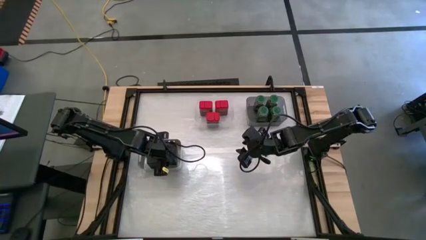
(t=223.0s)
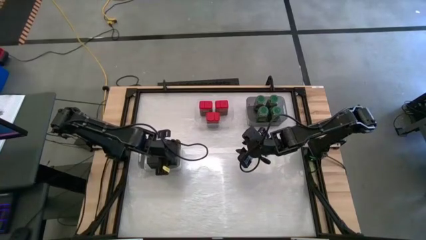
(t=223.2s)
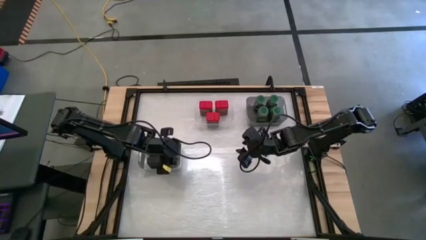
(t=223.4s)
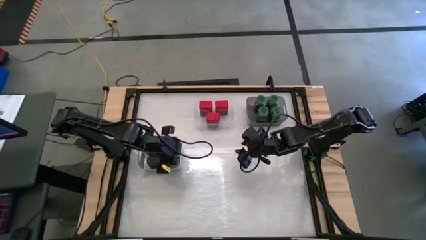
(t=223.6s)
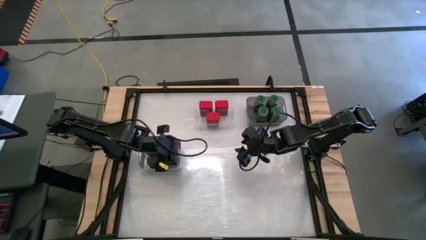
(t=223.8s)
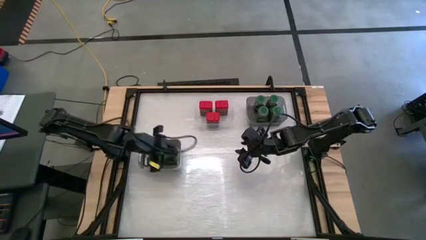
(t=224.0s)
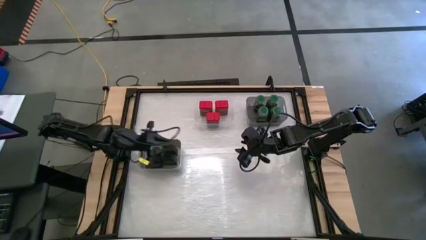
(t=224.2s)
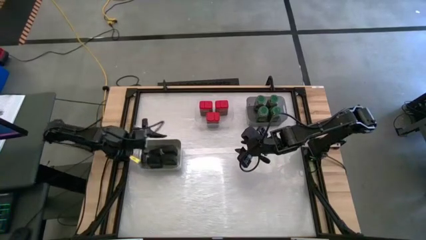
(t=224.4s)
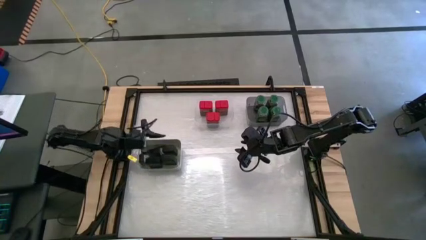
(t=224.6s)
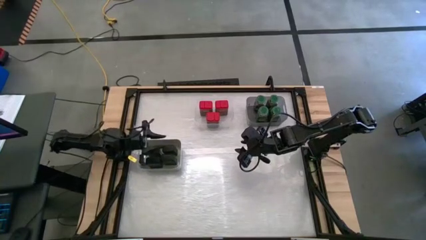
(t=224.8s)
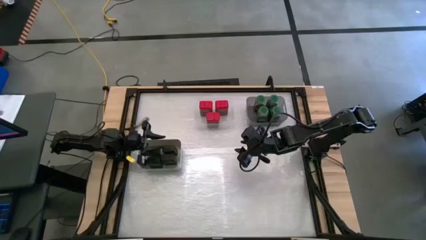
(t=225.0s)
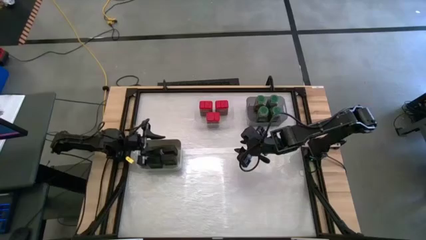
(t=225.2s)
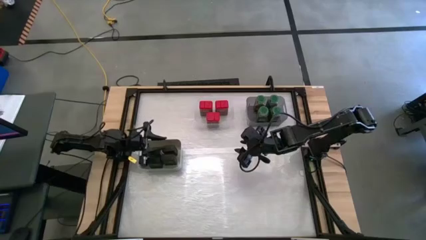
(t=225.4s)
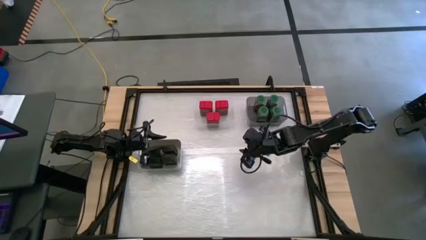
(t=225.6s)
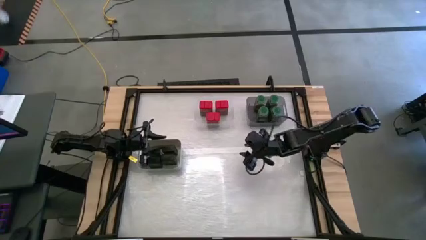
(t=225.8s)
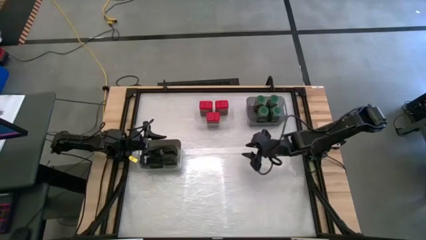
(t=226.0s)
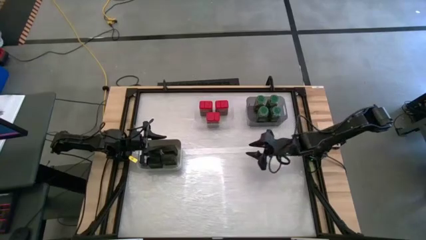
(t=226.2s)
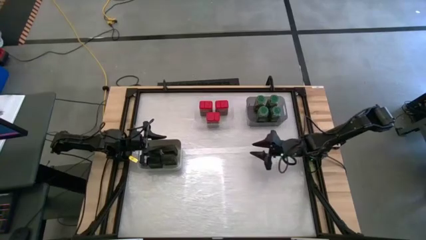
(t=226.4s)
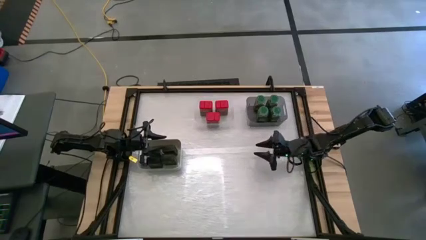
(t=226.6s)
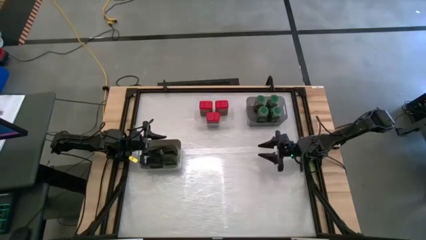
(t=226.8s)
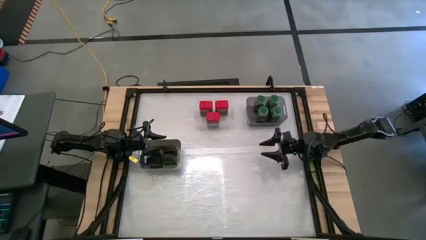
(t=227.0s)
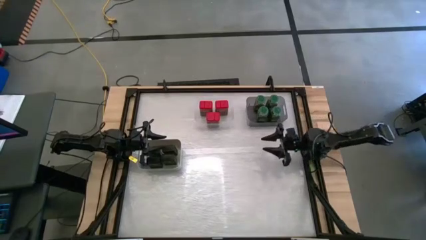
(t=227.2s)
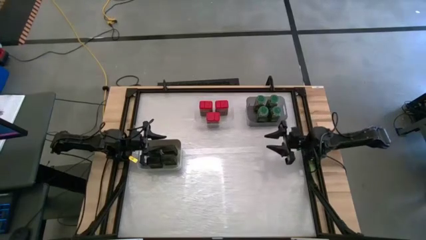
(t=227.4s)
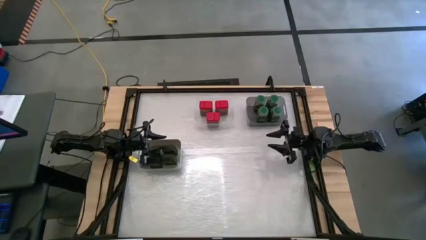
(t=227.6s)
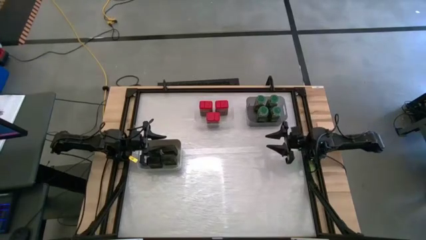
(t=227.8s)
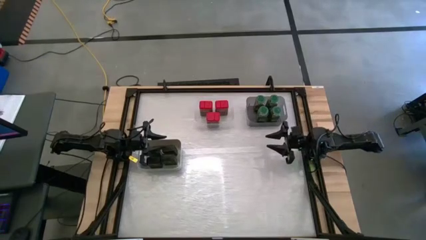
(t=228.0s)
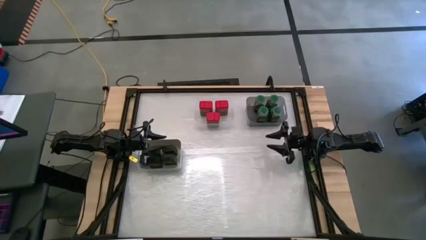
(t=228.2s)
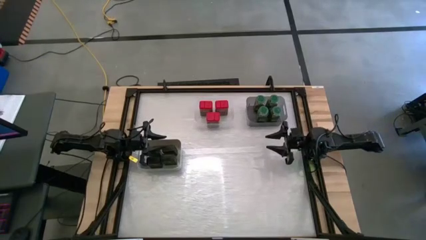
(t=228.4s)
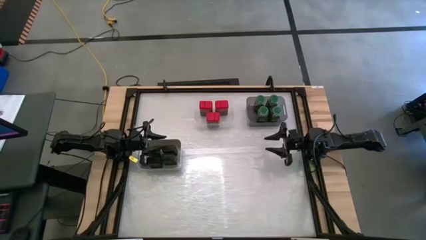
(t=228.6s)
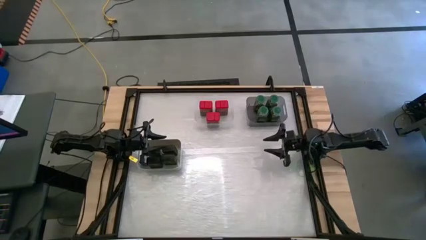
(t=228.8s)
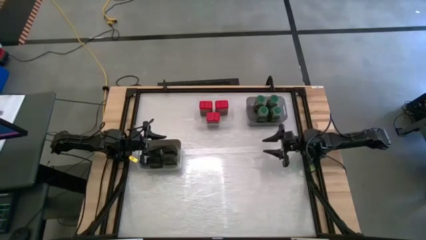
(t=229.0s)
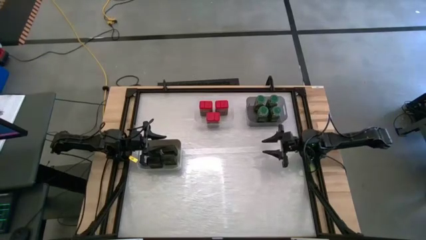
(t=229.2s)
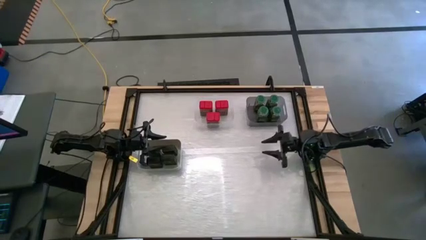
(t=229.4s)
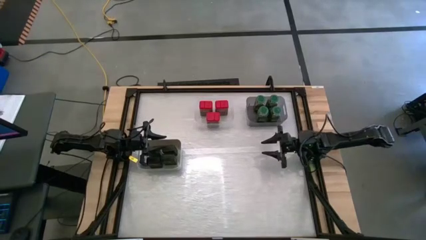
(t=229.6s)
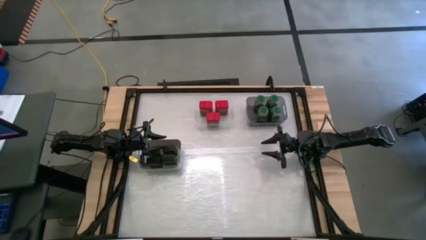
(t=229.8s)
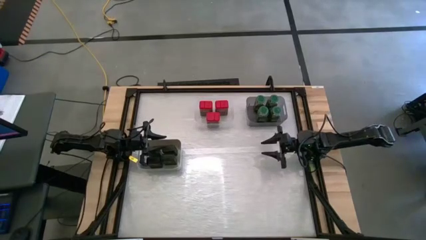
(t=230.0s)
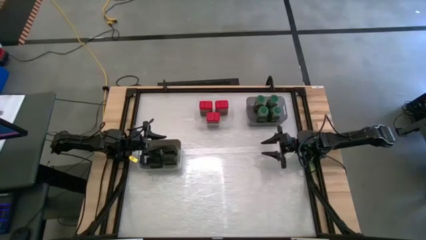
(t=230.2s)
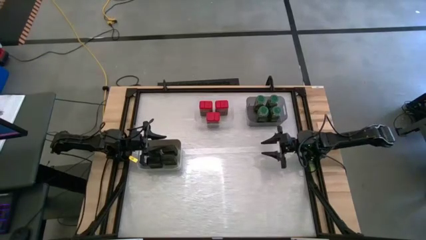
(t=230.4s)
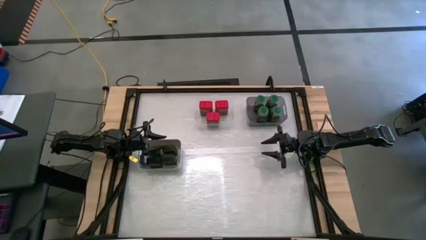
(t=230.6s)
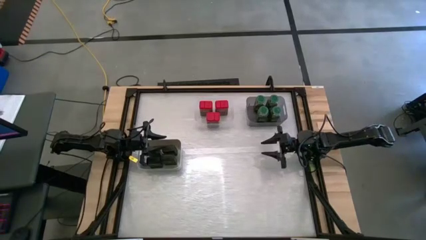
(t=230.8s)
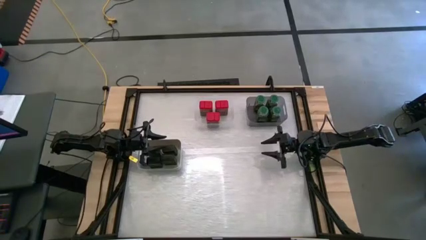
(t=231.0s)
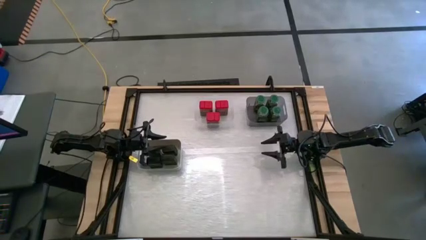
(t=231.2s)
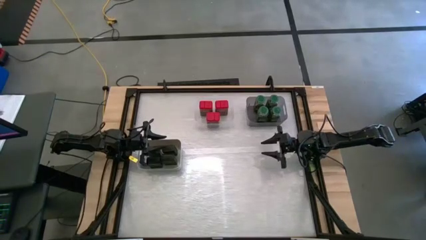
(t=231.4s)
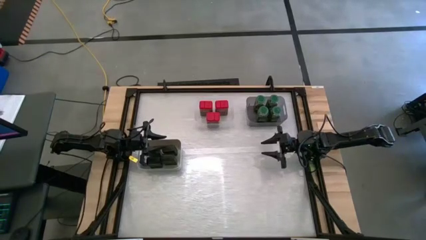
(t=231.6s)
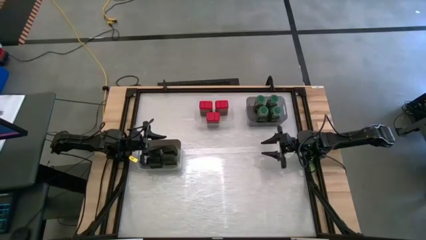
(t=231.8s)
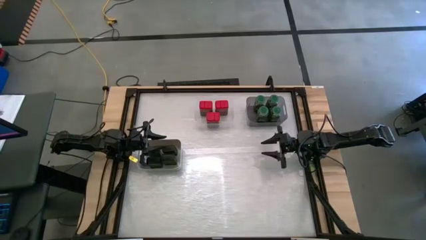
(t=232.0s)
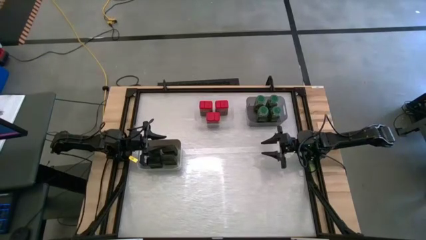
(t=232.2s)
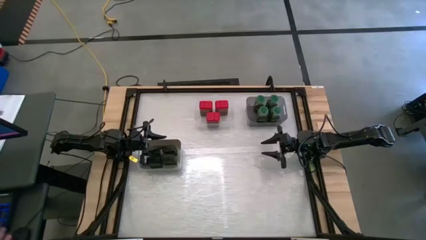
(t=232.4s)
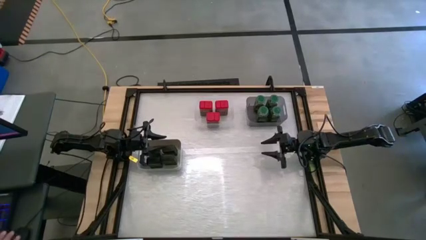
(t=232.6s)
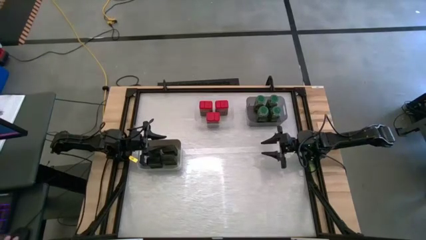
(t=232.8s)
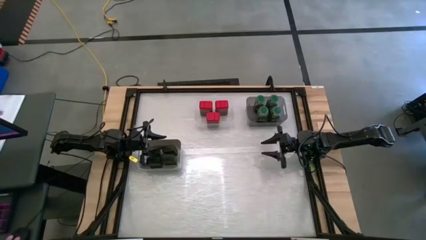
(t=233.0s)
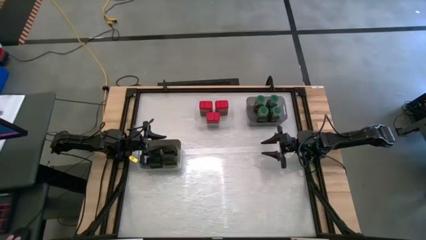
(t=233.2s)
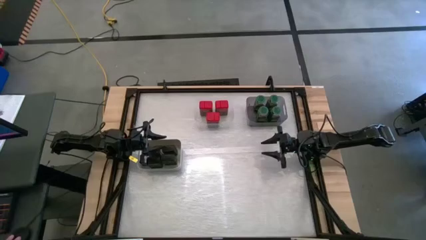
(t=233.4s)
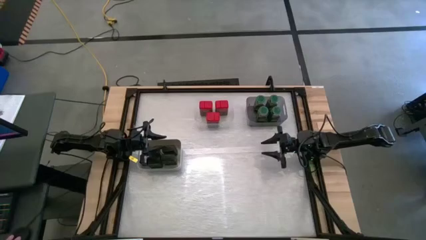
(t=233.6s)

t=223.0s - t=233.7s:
Task: Sort spices by type
Return to Home Position

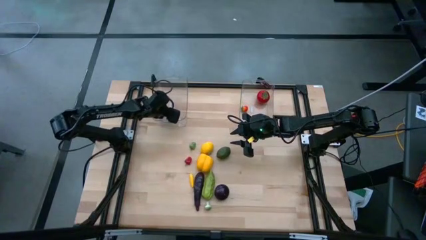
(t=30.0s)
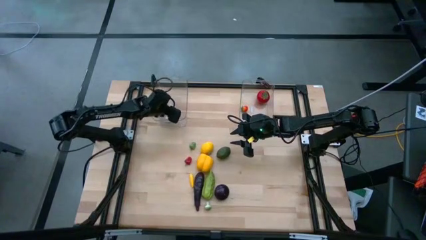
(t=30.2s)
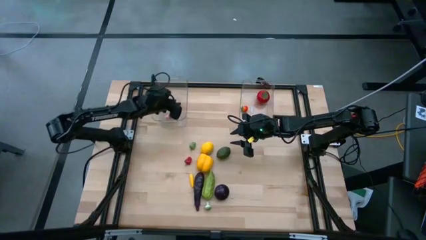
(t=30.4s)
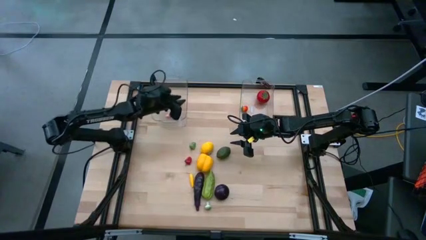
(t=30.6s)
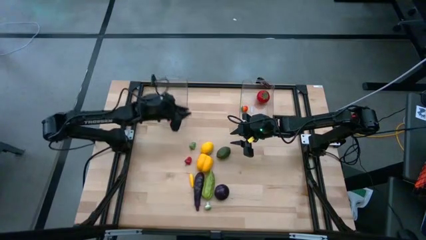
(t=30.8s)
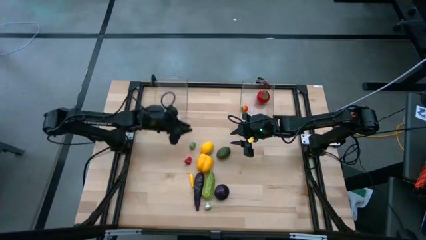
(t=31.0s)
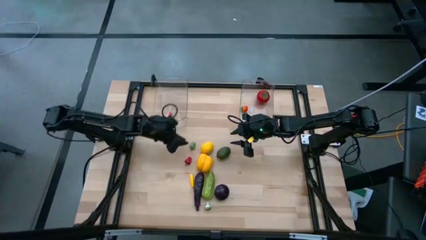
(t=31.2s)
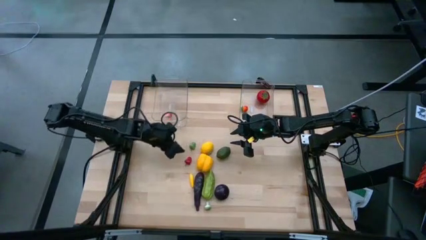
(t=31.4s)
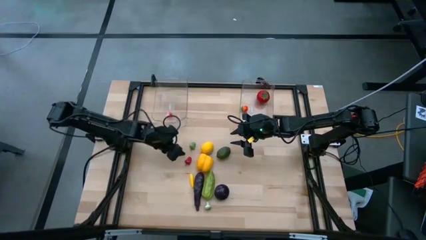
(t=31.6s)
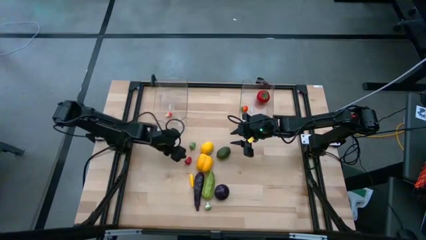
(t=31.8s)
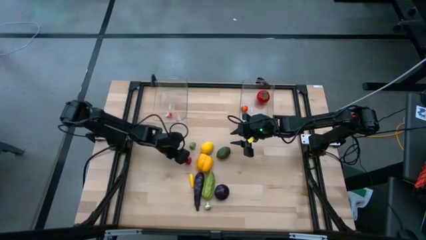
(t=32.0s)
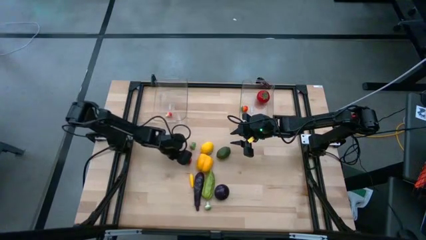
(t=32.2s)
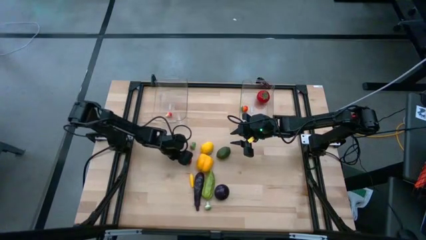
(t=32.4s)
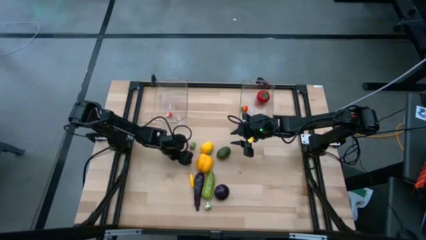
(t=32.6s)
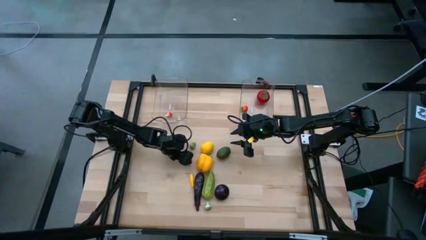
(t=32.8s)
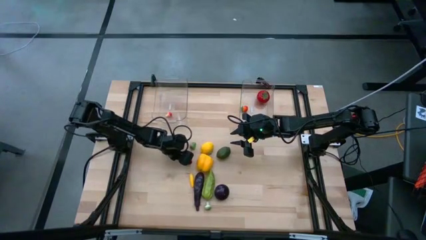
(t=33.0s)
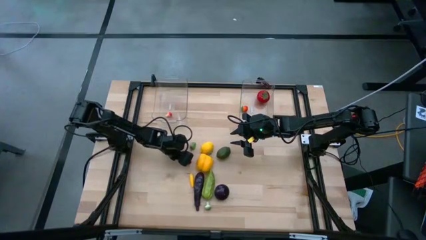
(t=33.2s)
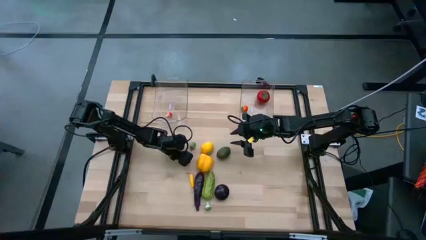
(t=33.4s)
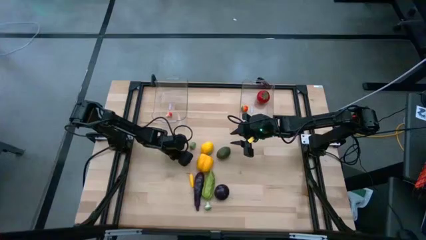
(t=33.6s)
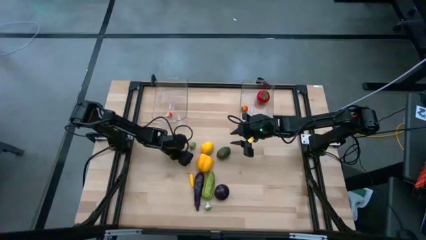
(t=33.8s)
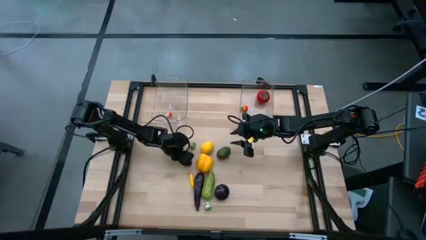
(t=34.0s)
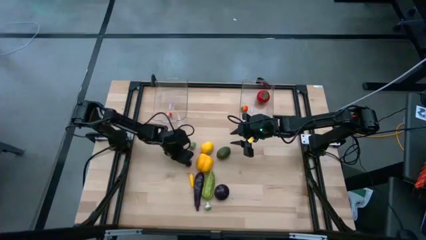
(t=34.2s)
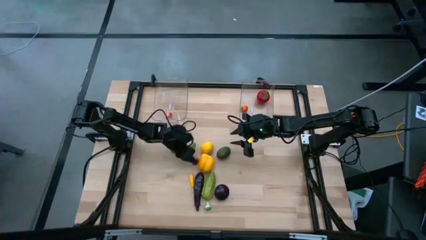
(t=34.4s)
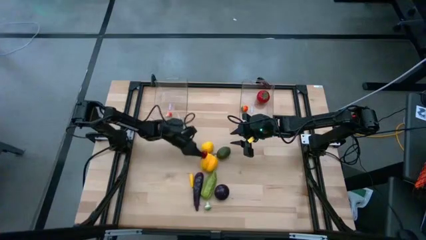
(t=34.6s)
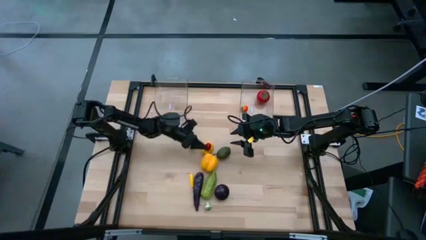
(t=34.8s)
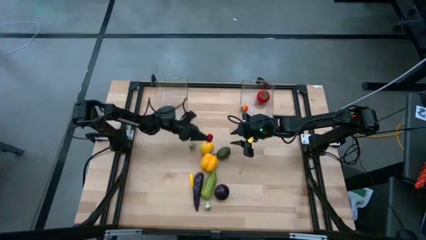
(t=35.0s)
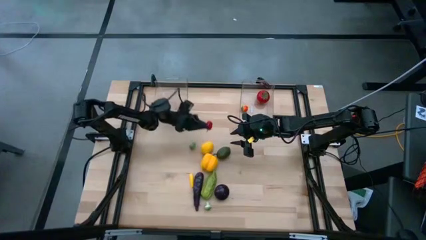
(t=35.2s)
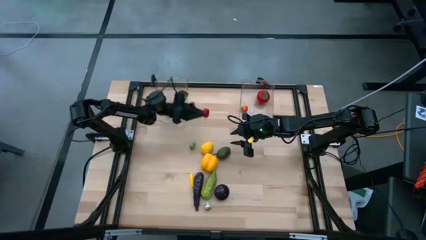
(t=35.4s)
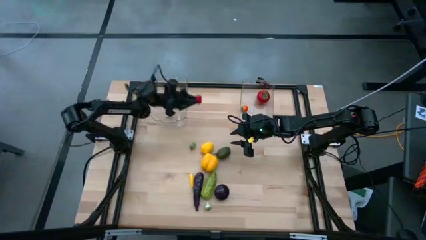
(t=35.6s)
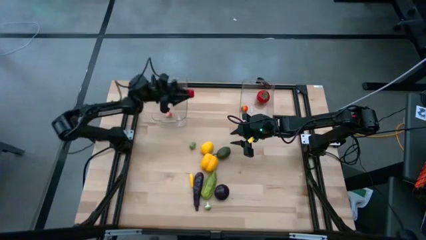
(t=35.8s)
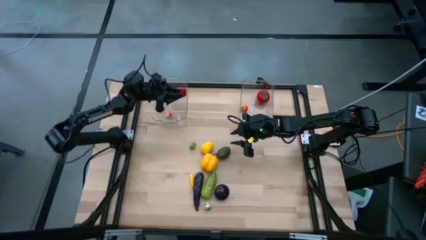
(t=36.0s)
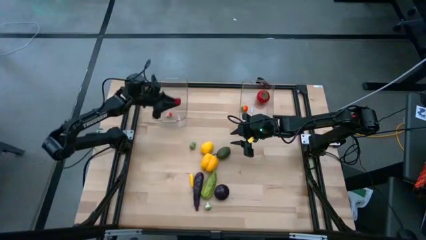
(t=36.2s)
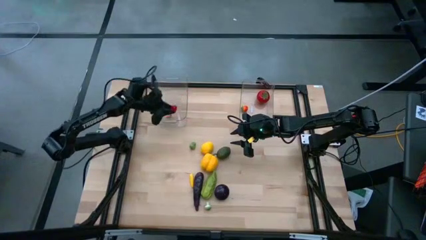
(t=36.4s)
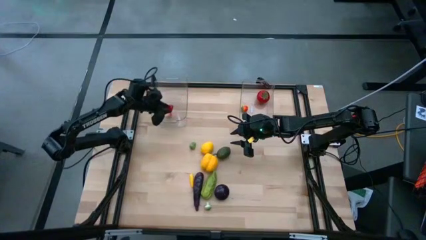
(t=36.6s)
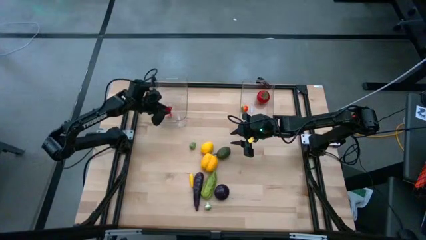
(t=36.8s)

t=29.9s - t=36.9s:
Task: Sort produce into baskets
Put the red chili pepper into the left transparent bin
